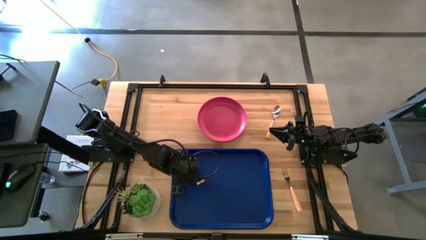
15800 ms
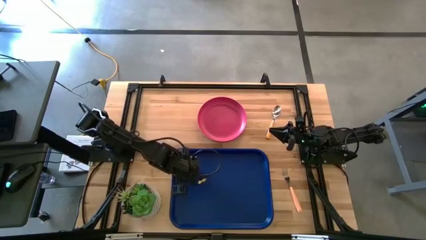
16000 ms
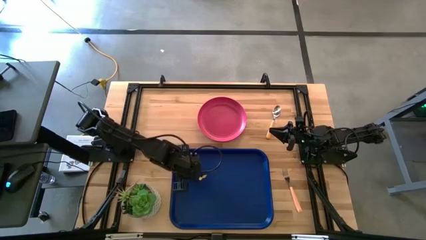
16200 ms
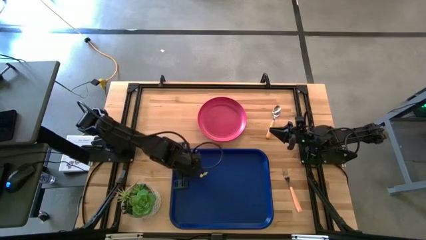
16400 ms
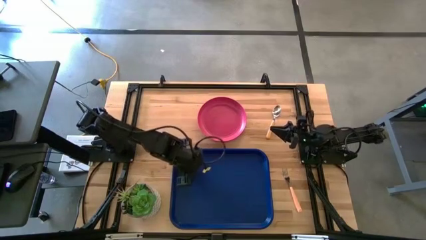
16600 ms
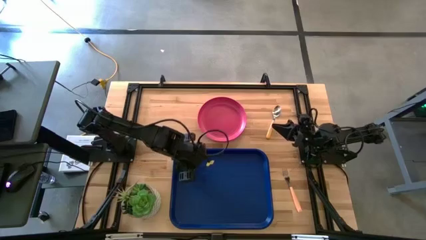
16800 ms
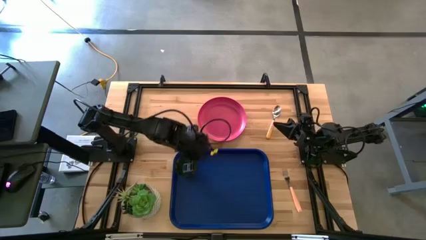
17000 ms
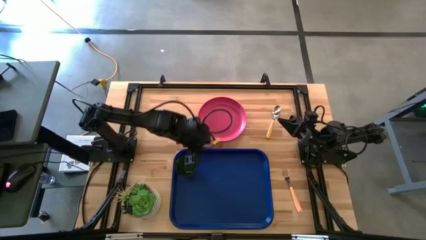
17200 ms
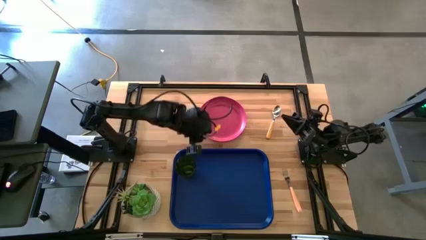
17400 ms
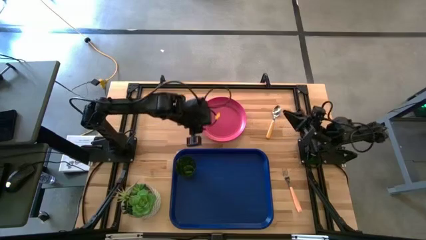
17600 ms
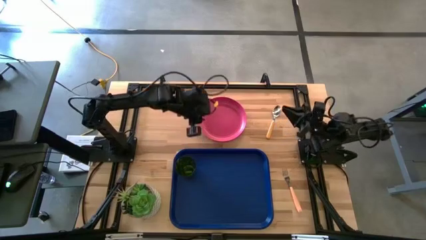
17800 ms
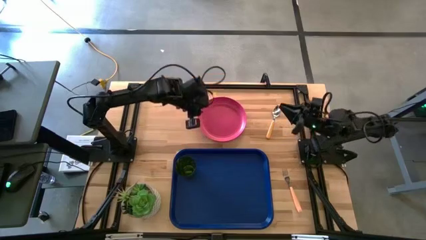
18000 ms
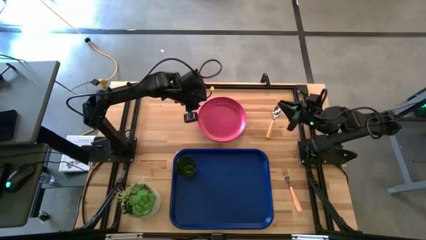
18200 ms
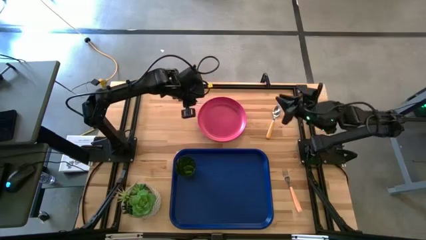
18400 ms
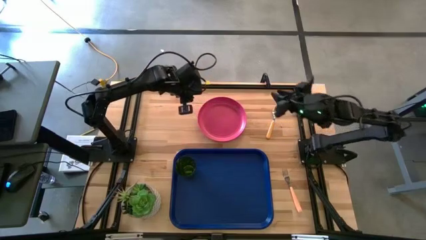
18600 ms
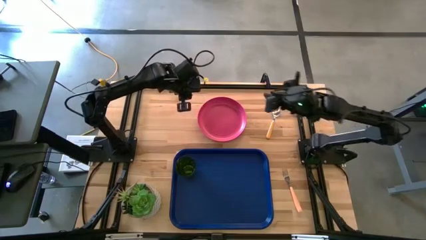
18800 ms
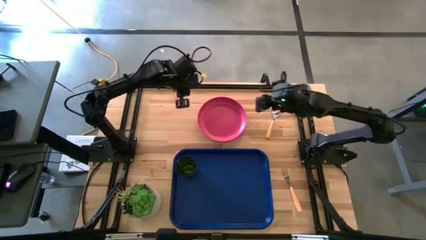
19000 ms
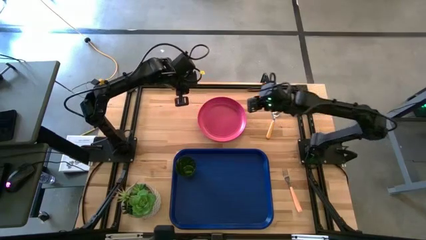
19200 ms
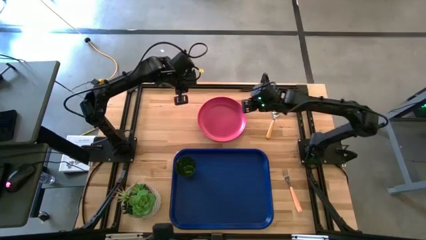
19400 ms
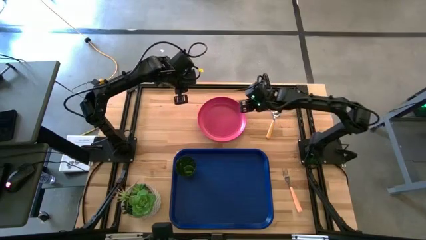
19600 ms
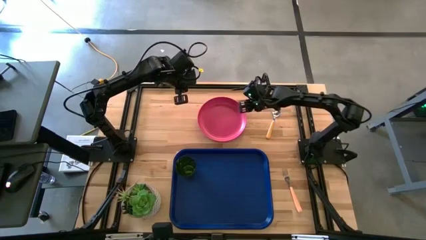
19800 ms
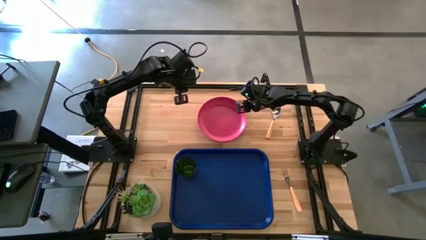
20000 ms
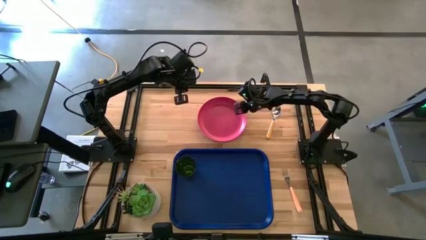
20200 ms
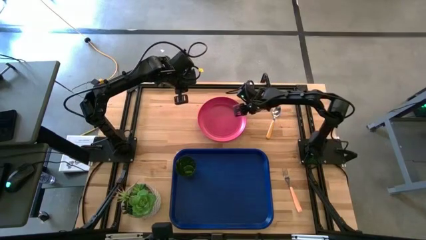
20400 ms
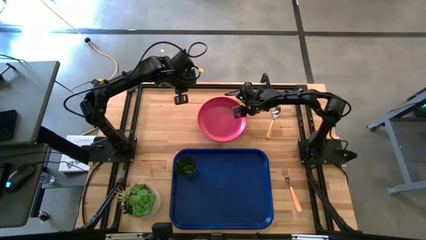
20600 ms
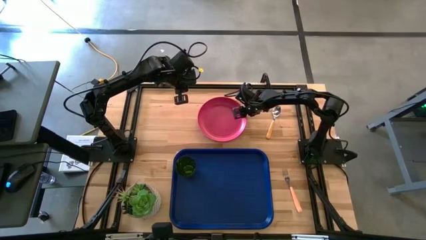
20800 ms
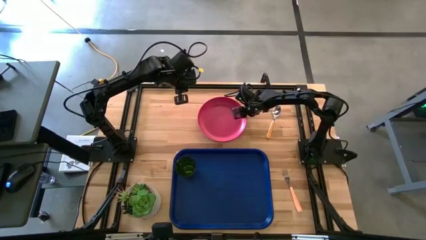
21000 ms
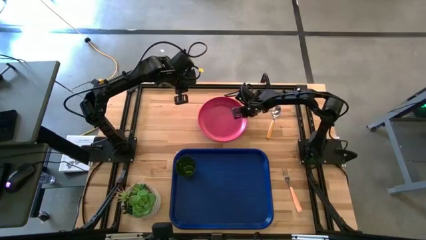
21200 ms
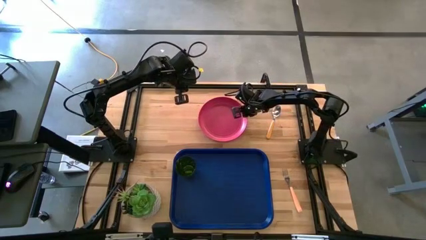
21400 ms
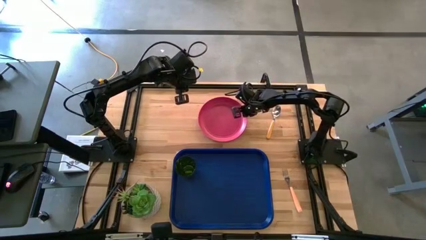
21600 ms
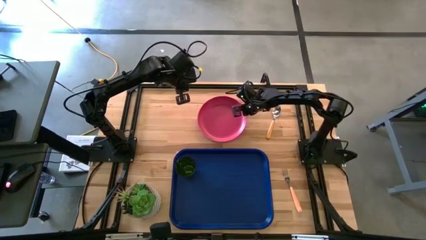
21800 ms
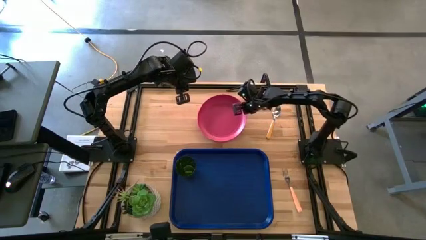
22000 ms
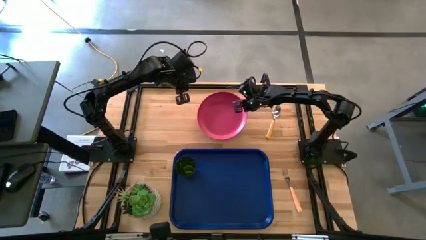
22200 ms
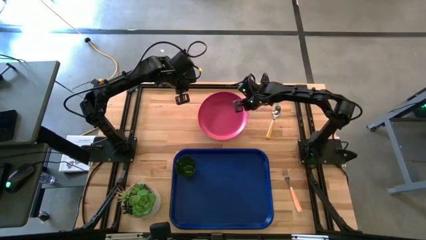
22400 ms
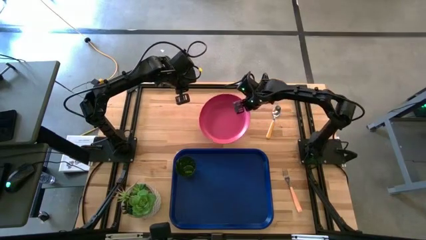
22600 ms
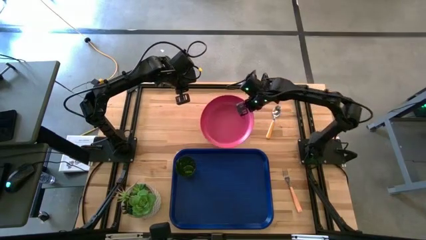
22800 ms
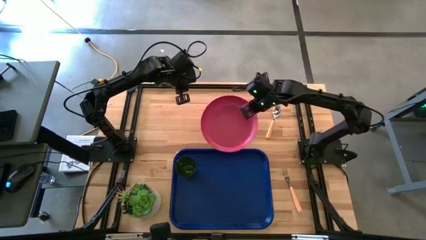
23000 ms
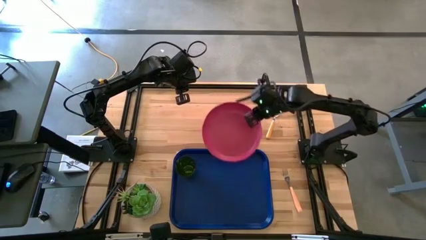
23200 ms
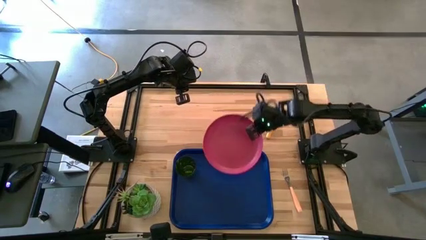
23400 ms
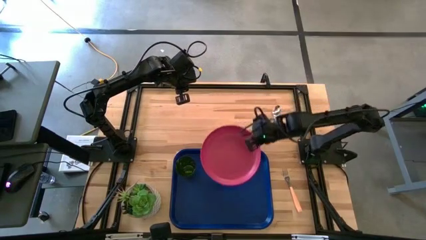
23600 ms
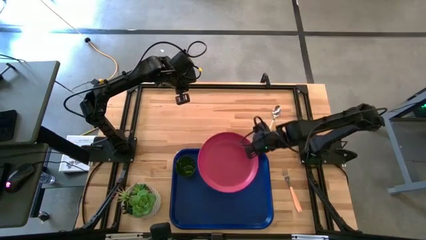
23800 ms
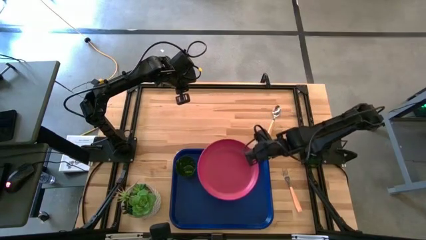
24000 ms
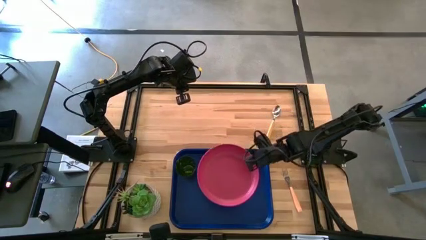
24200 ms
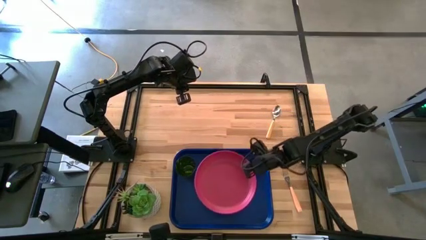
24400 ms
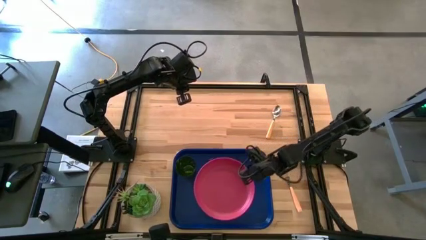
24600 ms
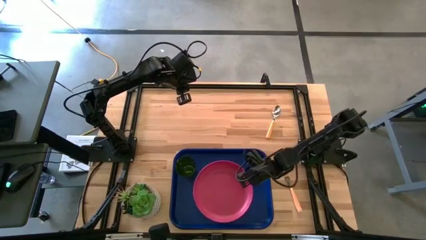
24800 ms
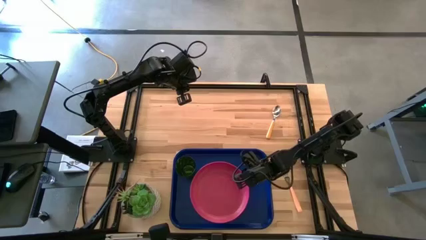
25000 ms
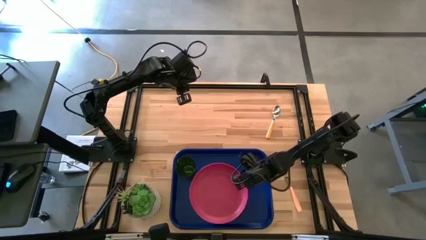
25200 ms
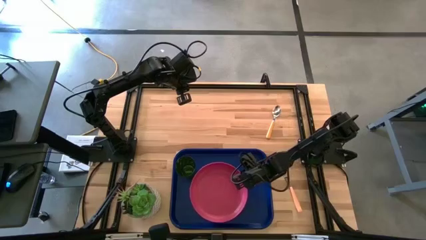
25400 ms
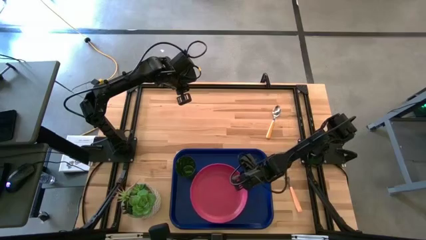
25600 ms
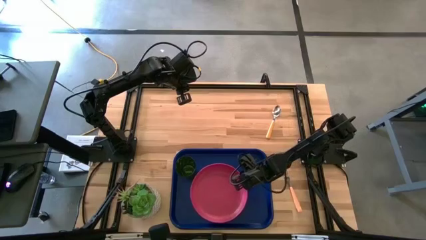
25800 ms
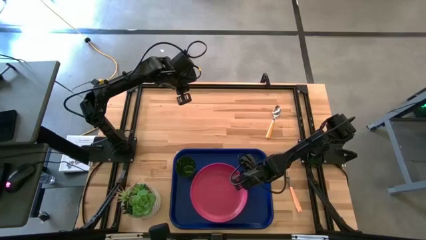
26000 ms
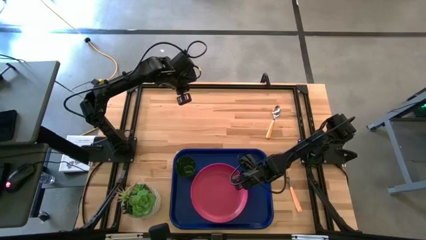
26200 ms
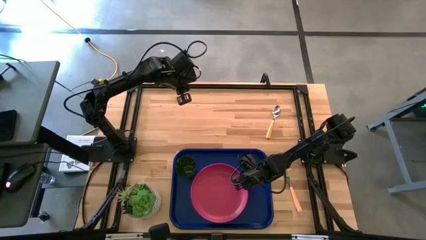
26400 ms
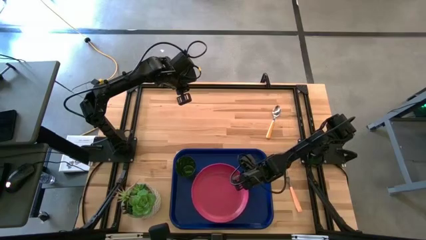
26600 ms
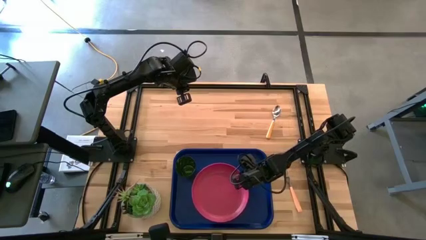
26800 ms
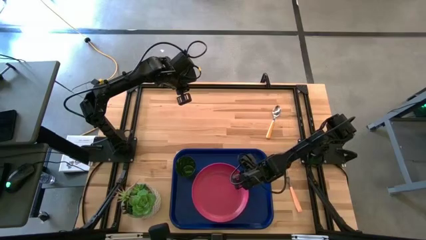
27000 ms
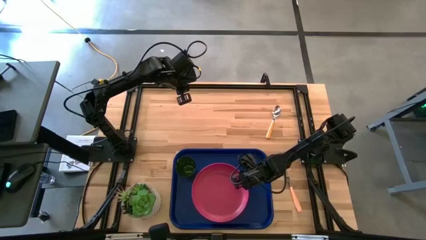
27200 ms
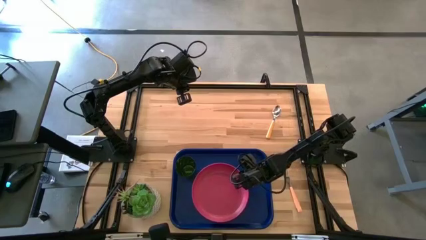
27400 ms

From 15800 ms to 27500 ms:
Task: Pick and place plate/cup/fork/spoon on tray
Put the pink plate on the blue serving tray to the bottom right of the green cup

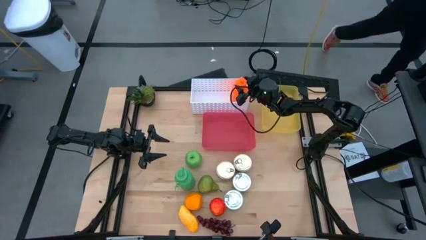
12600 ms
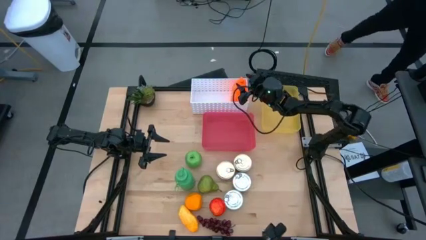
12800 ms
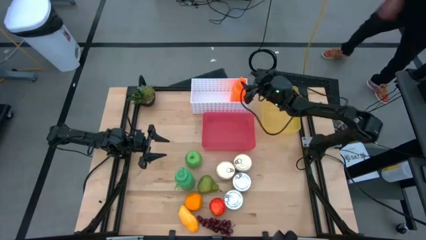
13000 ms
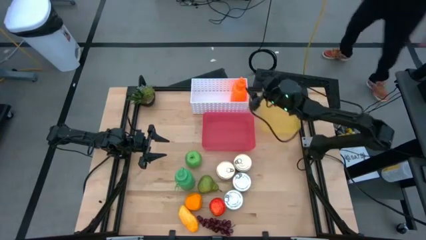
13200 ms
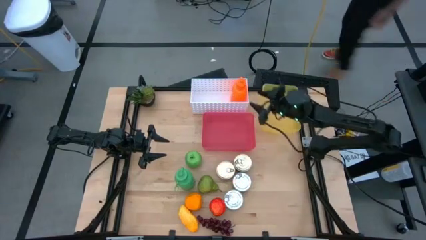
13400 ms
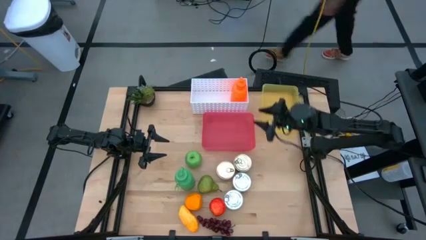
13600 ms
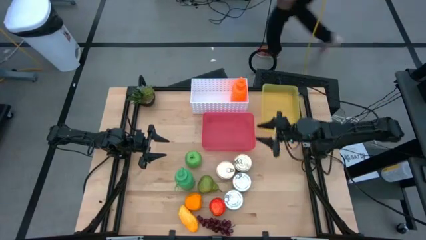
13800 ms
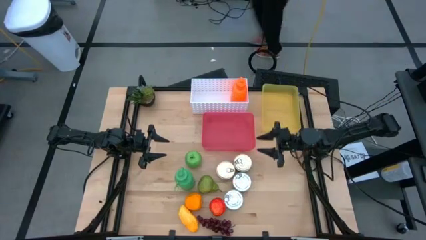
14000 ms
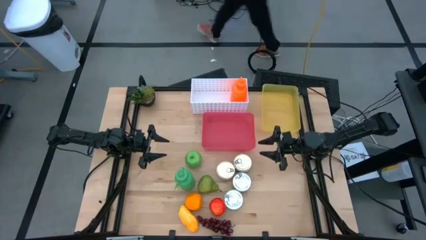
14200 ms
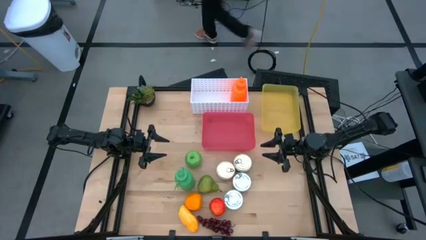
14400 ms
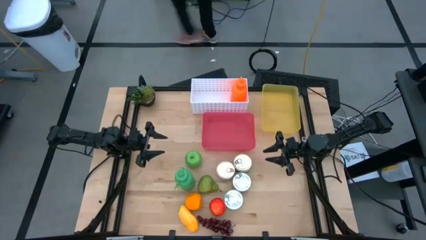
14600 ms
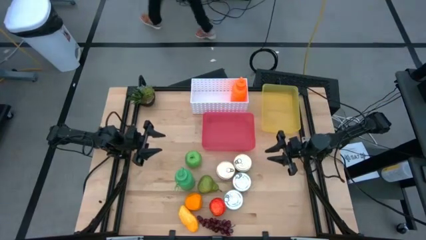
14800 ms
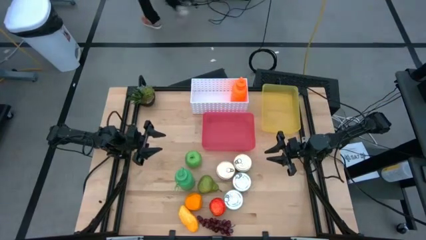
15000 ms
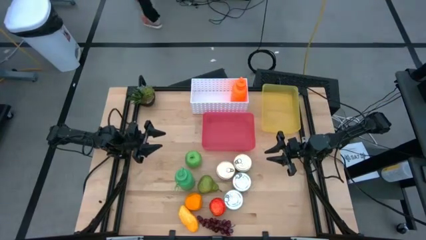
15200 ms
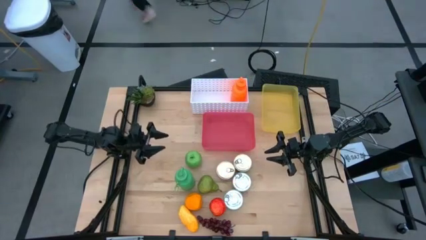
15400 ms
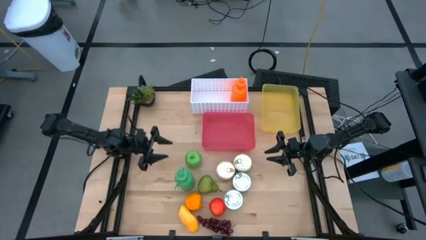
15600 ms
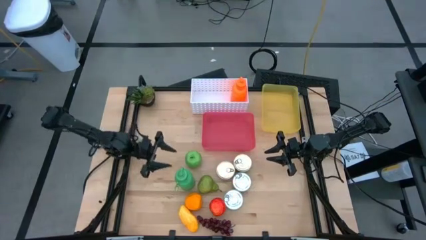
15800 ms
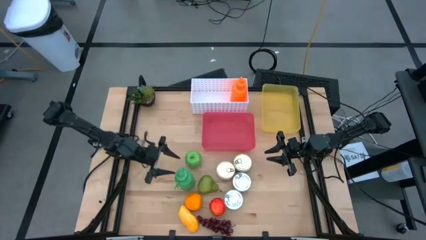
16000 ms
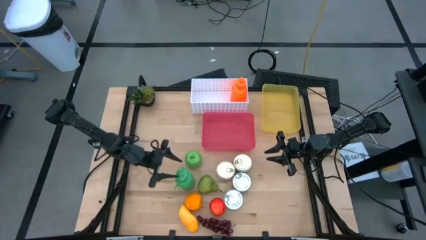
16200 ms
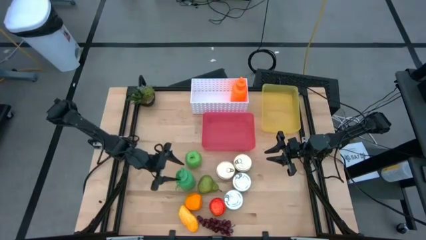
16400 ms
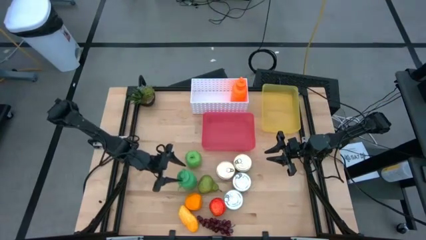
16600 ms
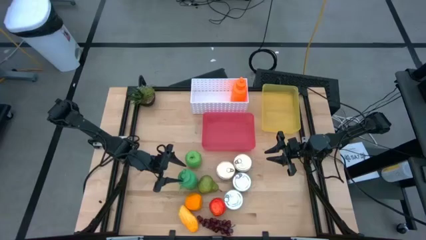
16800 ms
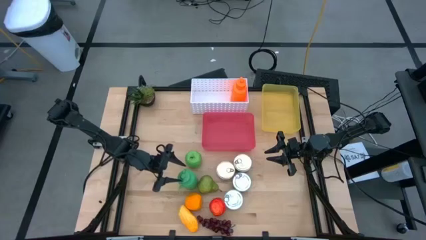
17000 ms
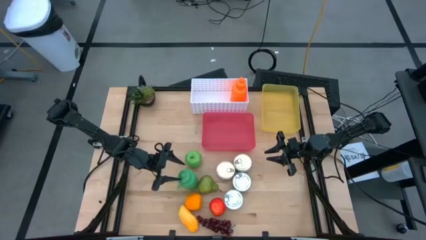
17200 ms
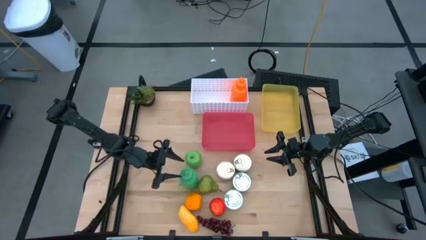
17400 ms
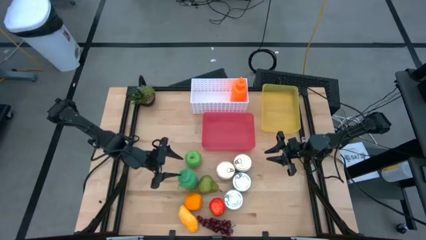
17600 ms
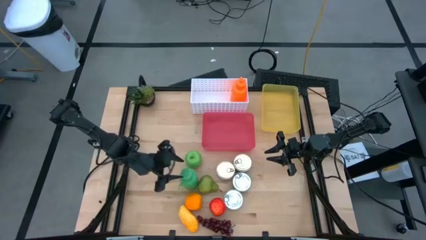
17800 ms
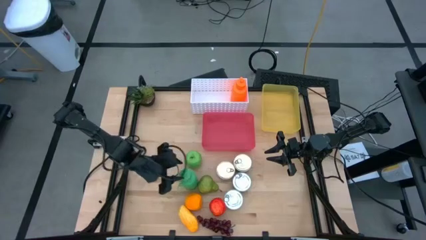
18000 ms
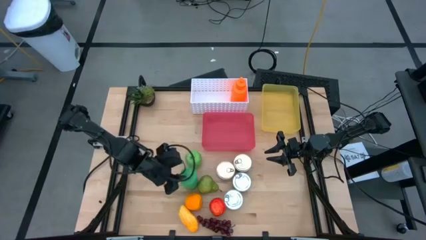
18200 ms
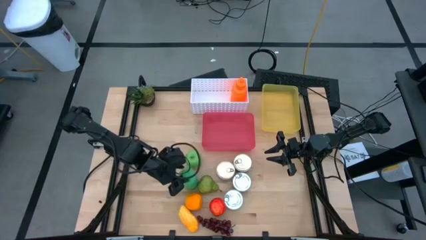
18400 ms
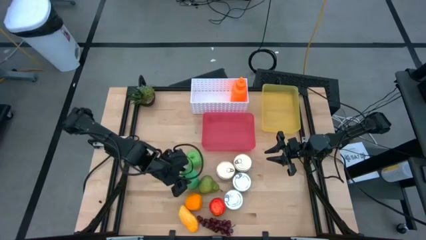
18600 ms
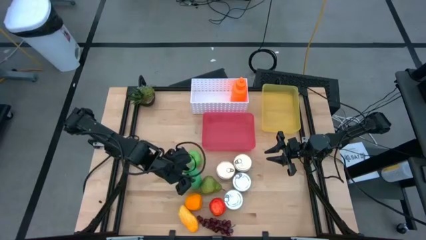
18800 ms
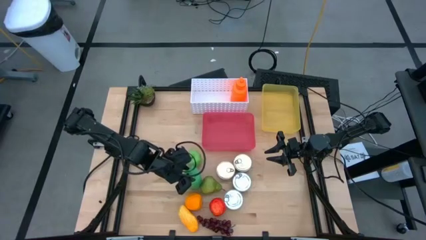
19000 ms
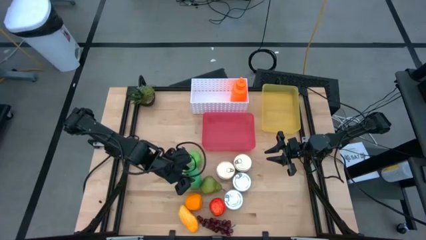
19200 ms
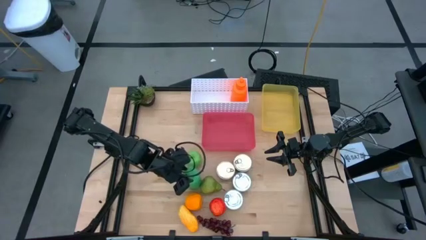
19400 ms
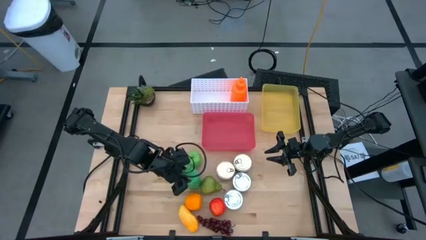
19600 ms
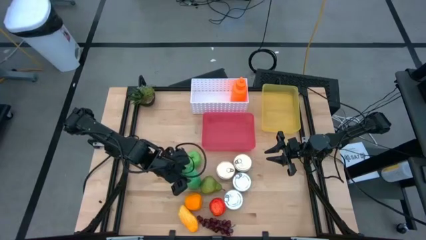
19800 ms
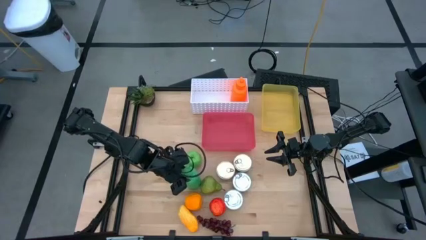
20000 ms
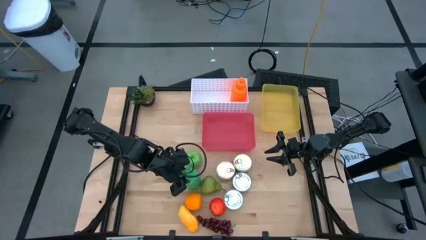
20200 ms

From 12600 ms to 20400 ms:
Task: Pick & Place Food Item
Put the green tumbler into the white bin
